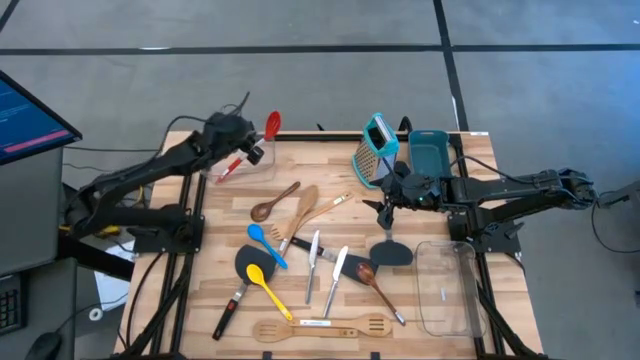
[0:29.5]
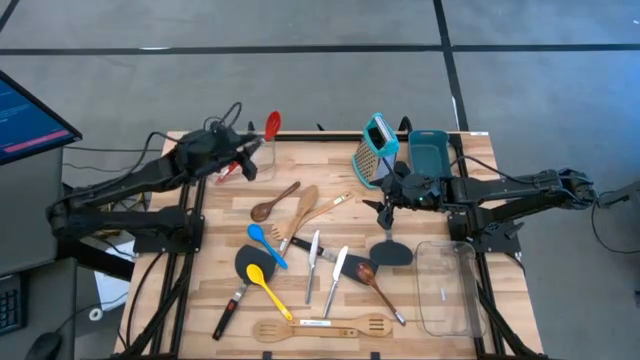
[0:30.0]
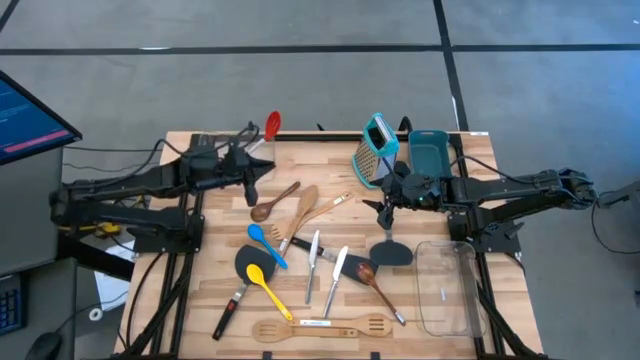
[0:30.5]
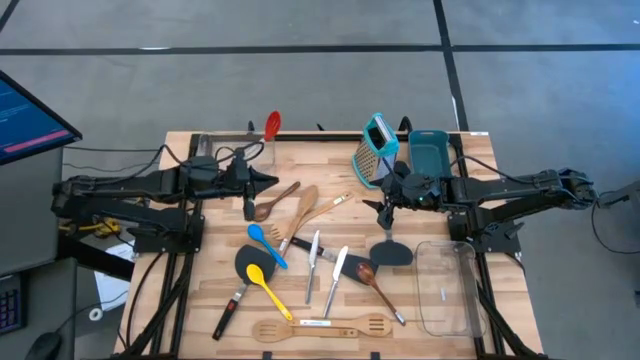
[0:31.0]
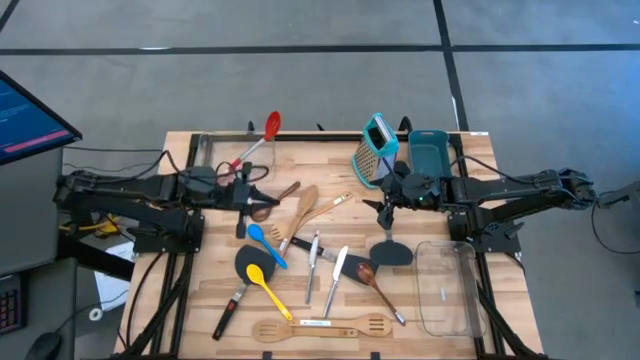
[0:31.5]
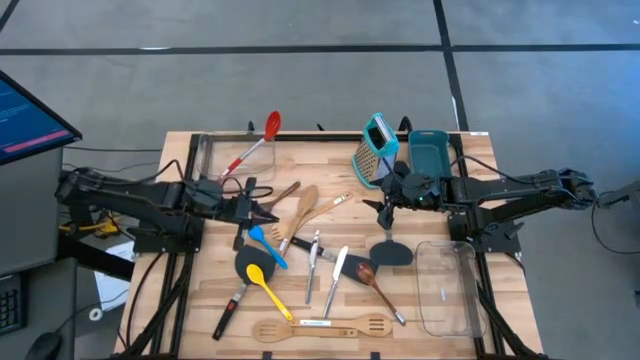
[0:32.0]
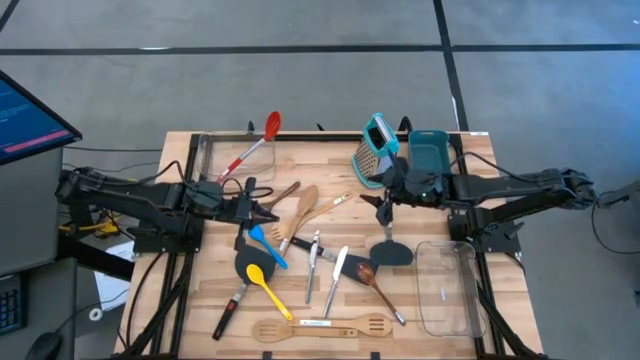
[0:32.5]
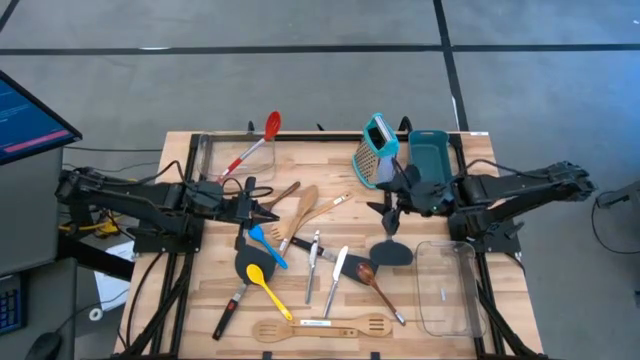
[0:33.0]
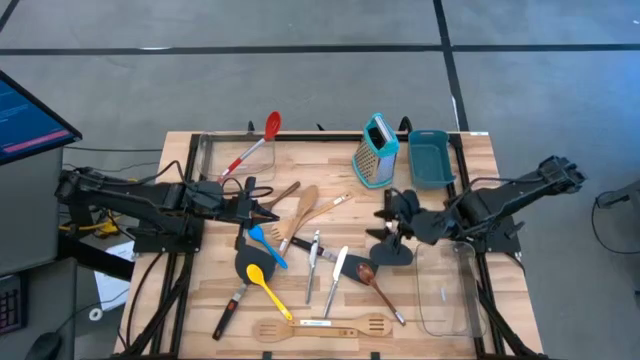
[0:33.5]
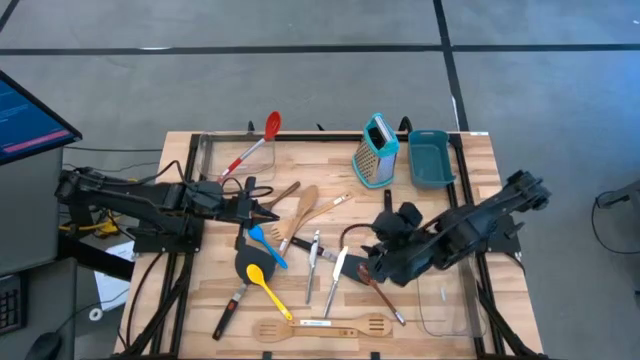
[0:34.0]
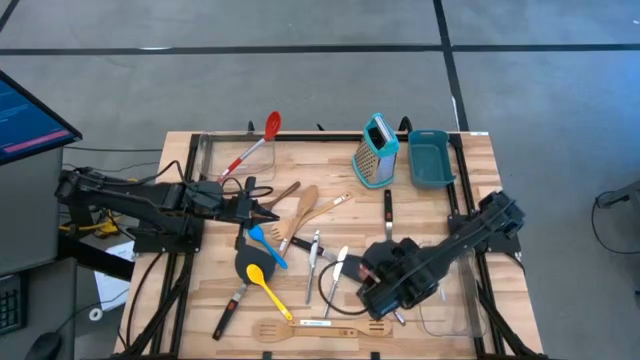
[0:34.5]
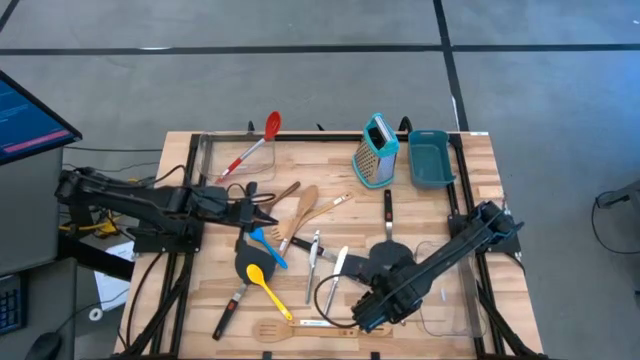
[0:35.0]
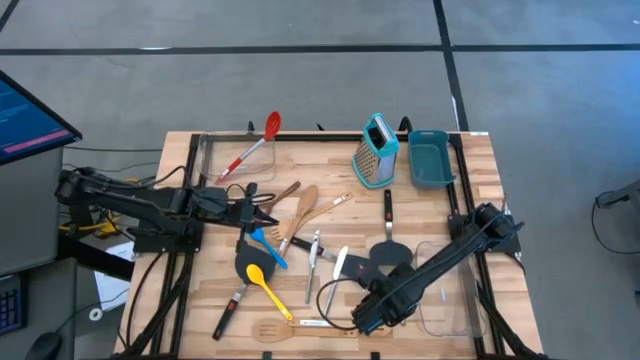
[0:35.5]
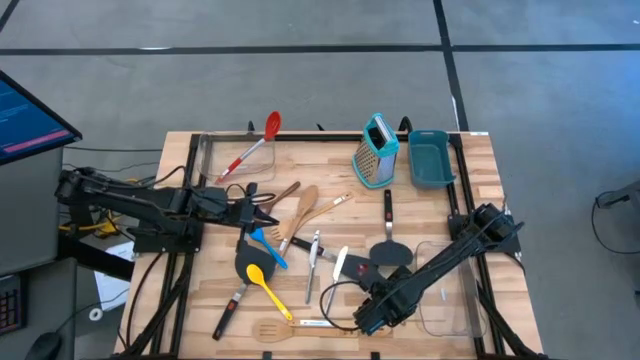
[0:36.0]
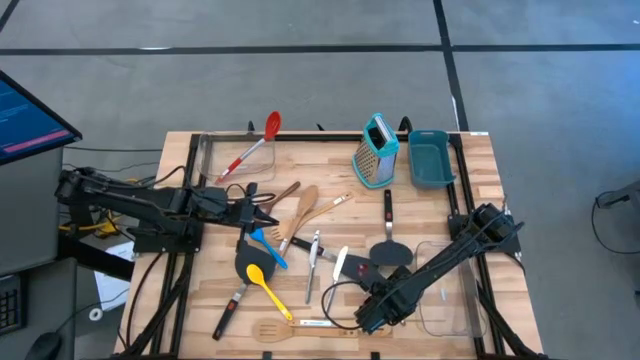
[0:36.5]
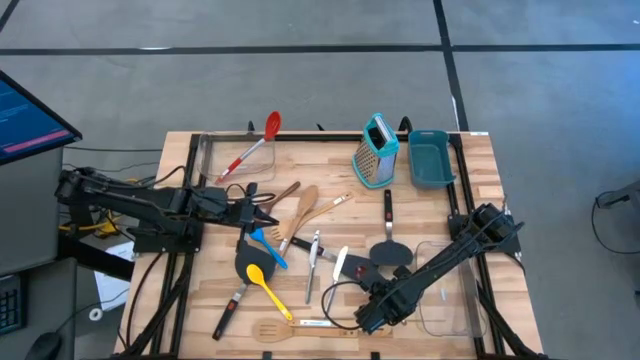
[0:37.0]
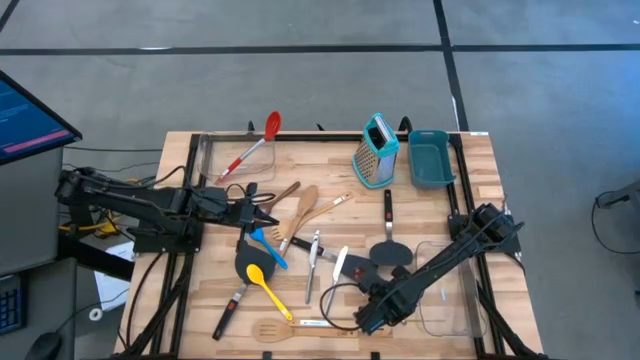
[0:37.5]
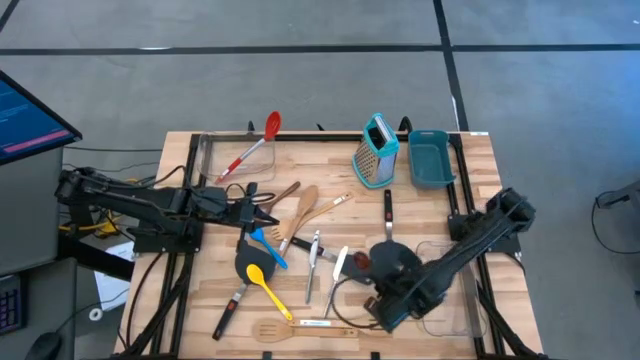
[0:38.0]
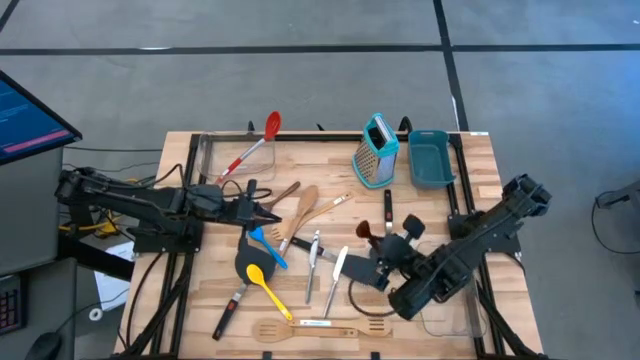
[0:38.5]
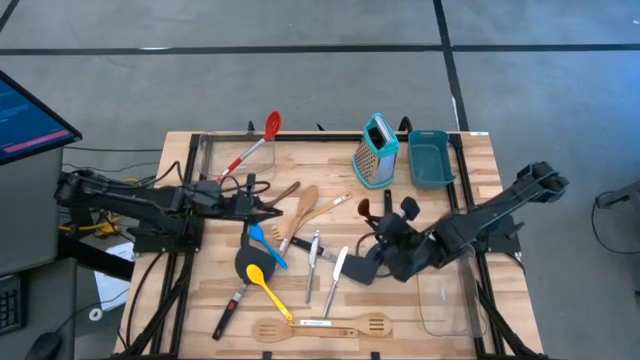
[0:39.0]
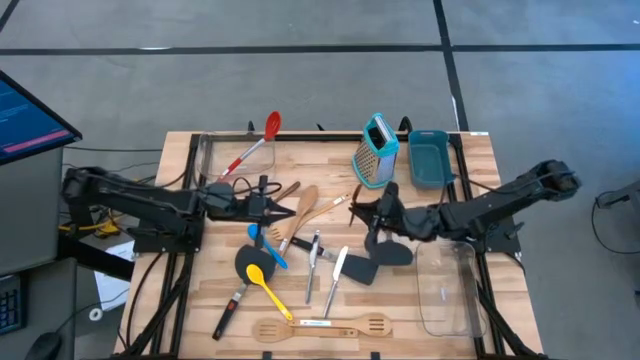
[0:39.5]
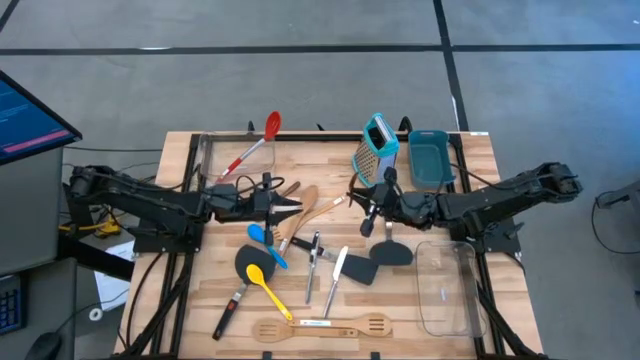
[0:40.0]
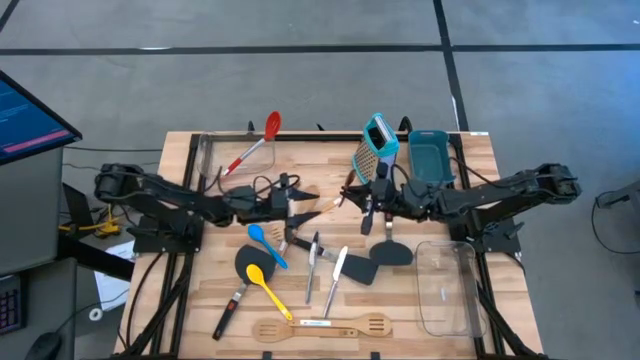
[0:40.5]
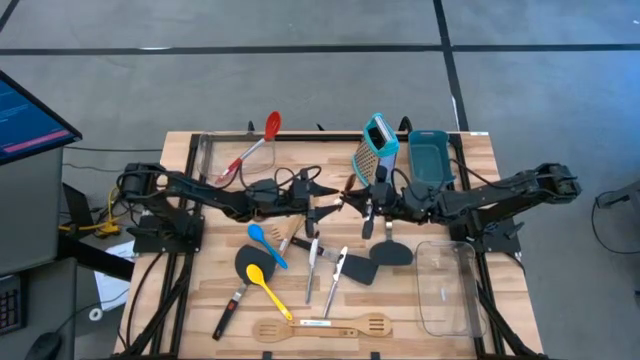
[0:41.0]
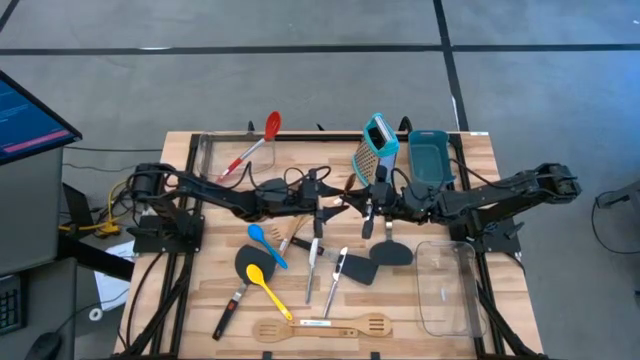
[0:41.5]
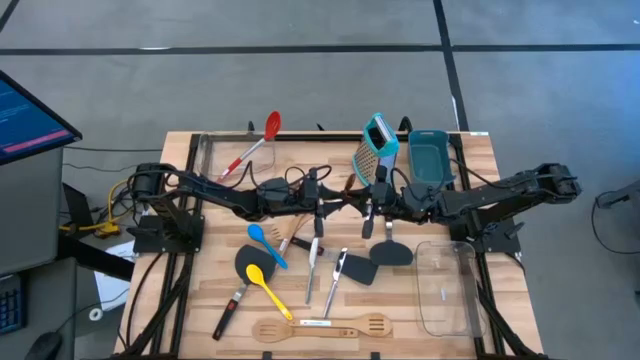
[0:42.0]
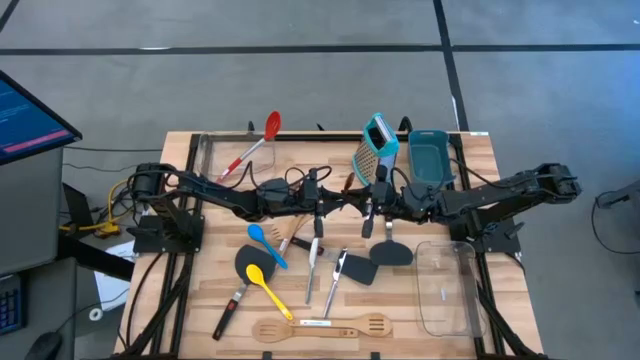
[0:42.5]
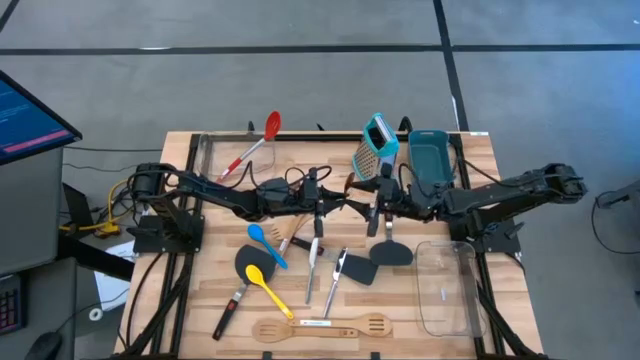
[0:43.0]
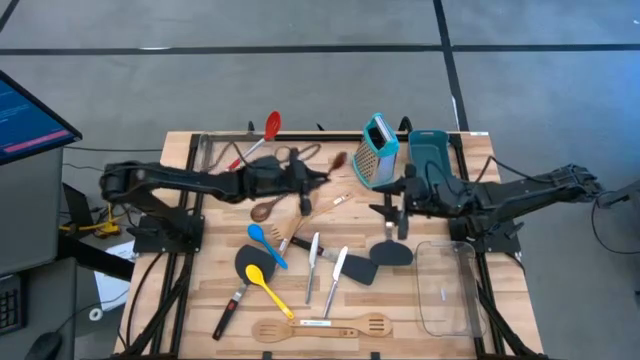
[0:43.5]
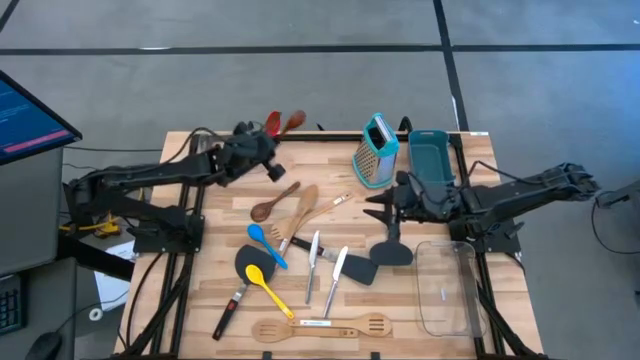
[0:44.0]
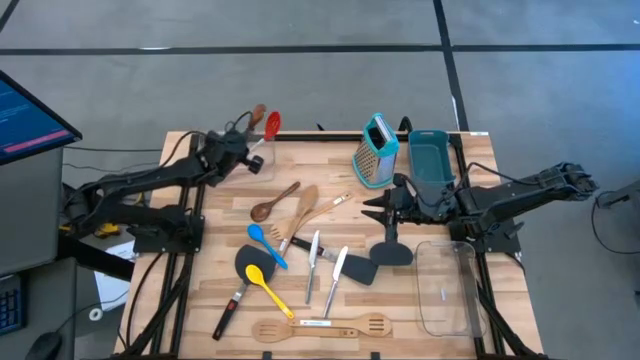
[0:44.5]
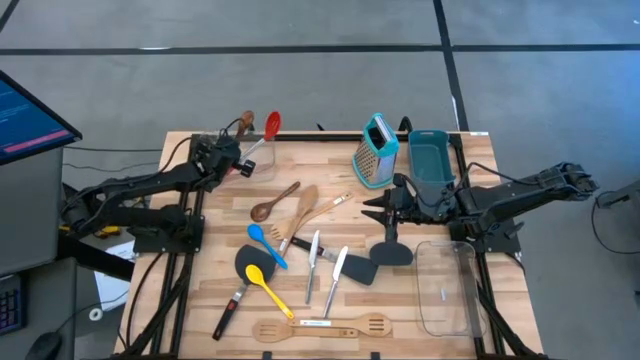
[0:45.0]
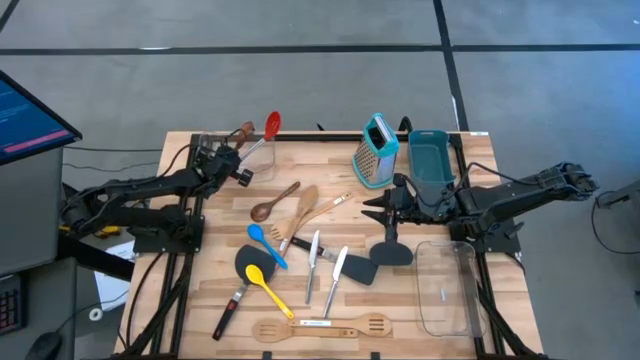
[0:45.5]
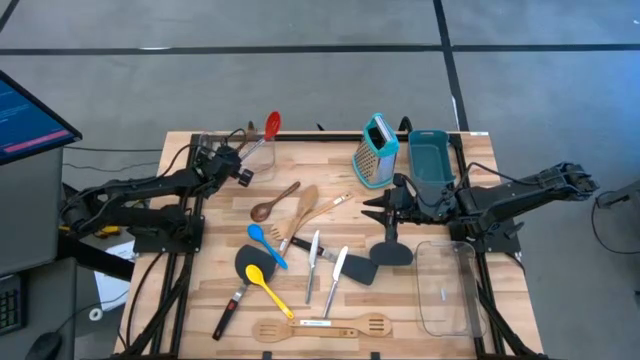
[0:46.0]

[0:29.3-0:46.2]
Task: Pick & Place Kitchen Items
Put the right dark brown wooden spoon into the left transparent bin

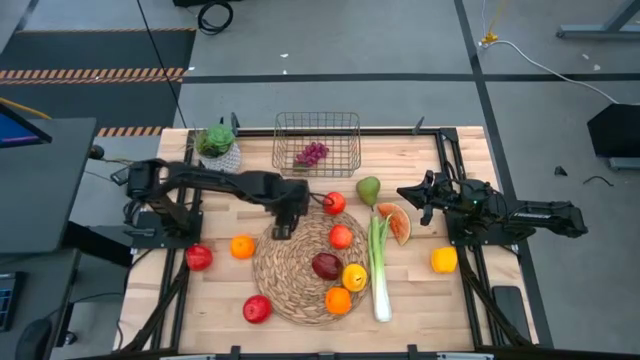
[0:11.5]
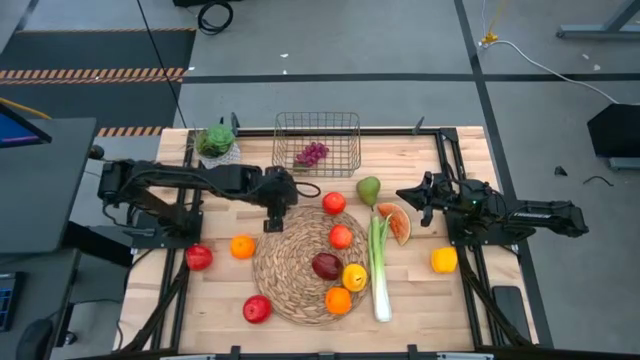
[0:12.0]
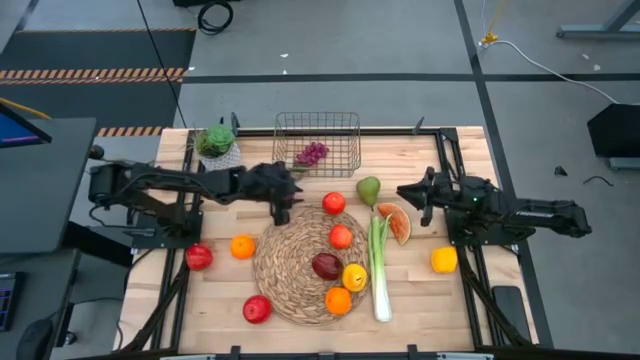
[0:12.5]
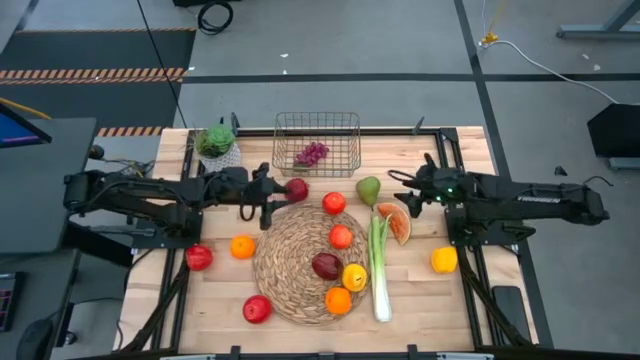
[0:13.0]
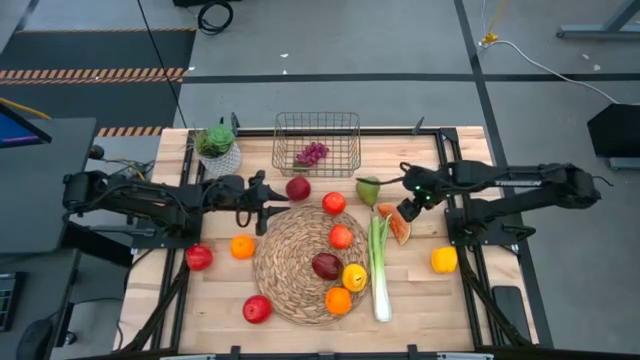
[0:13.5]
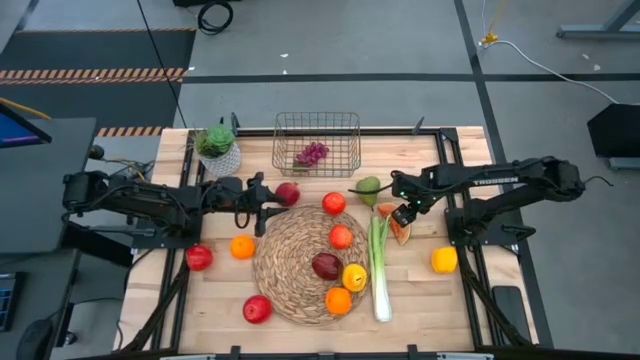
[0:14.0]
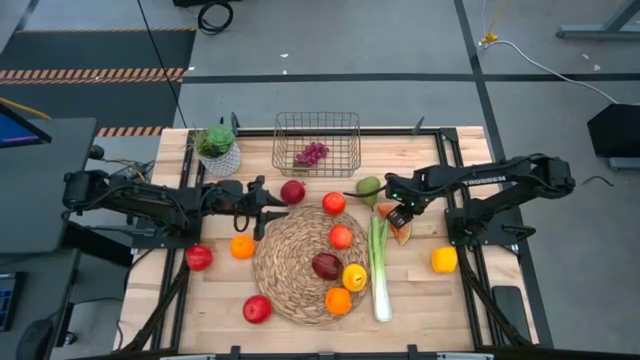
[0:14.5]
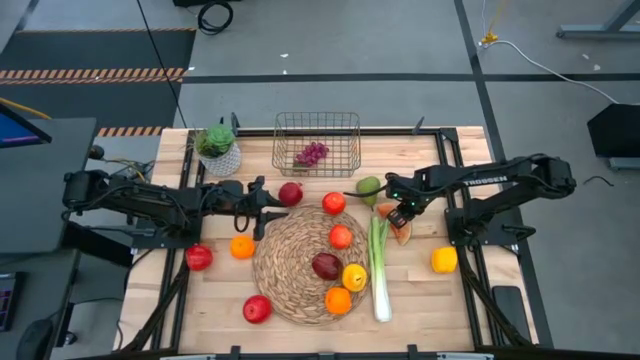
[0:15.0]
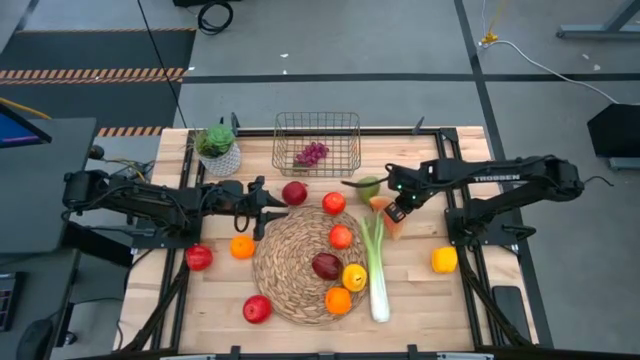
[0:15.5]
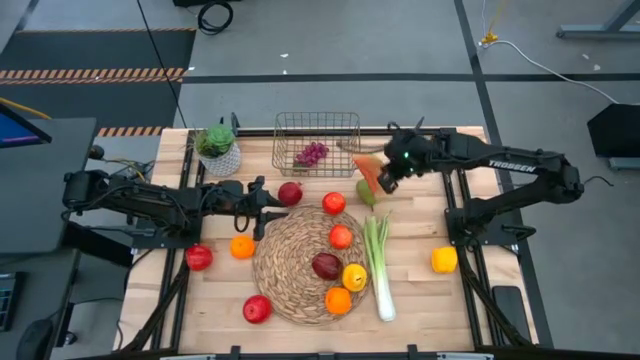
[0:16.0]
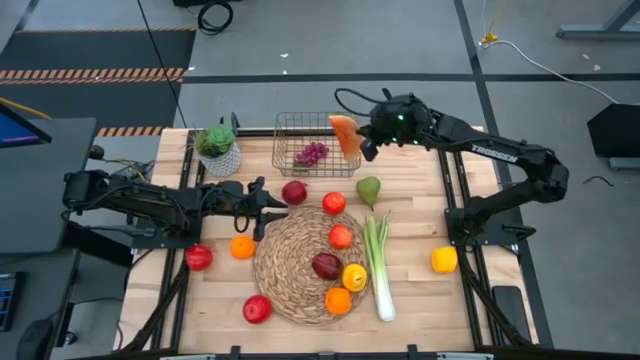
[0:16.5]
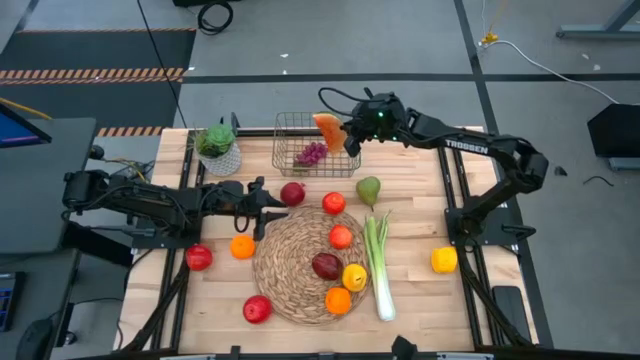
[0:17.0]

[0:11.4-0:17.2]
Task: Build produce basket
Put the watermelon into the wire basket
